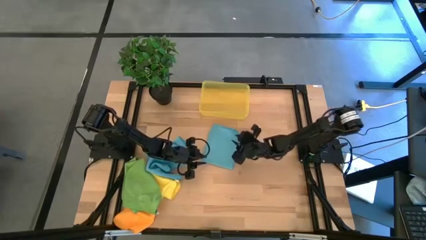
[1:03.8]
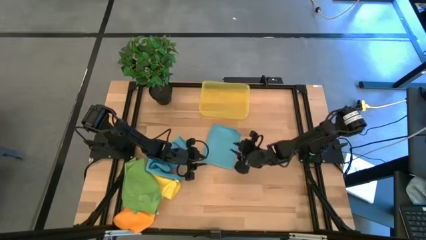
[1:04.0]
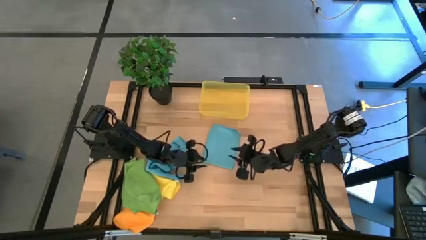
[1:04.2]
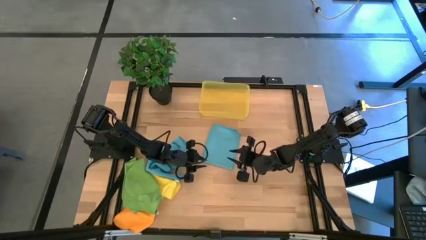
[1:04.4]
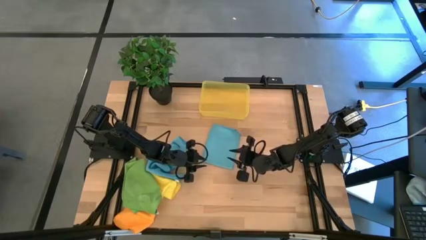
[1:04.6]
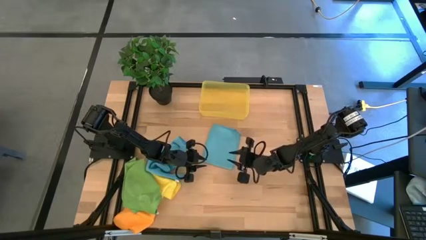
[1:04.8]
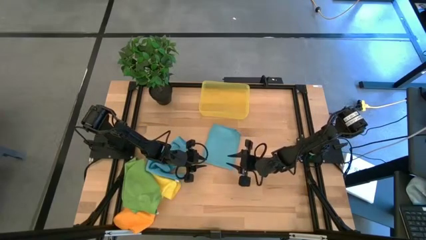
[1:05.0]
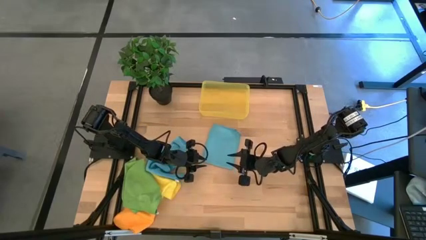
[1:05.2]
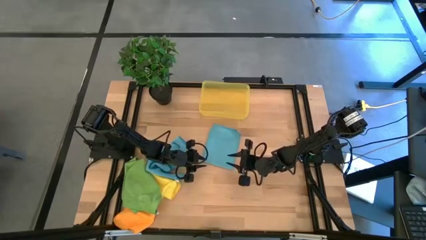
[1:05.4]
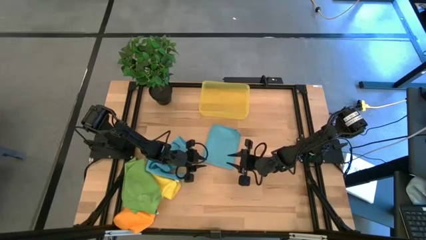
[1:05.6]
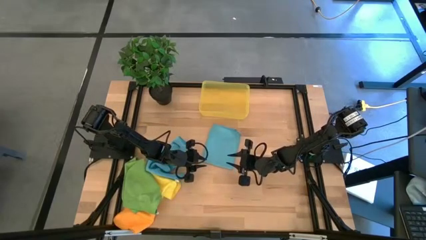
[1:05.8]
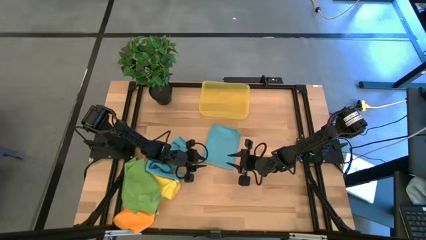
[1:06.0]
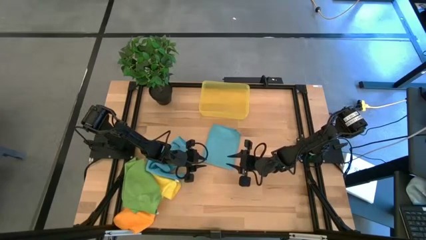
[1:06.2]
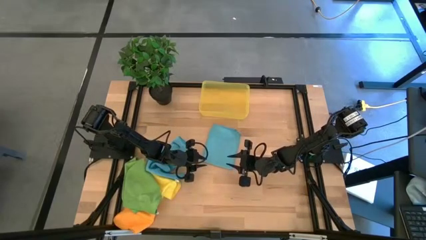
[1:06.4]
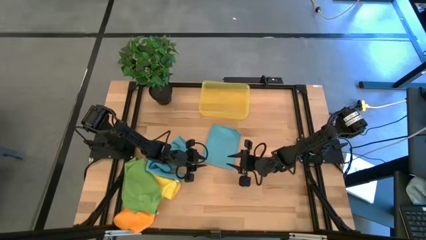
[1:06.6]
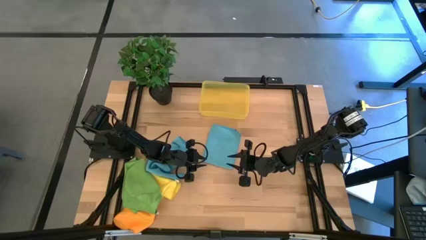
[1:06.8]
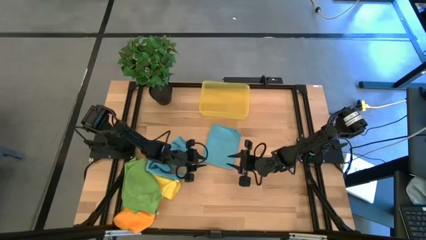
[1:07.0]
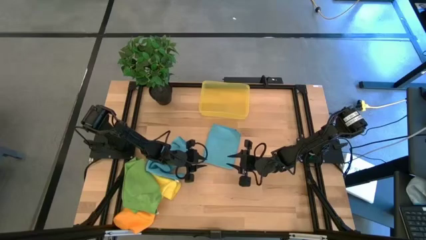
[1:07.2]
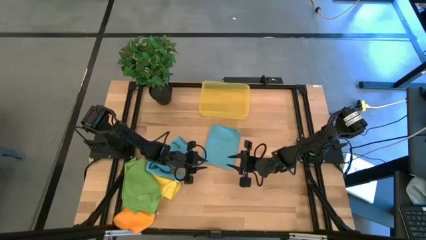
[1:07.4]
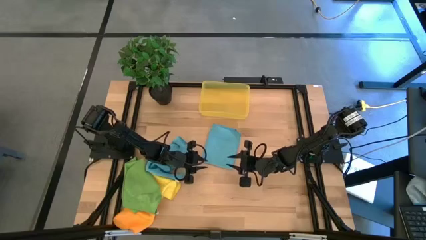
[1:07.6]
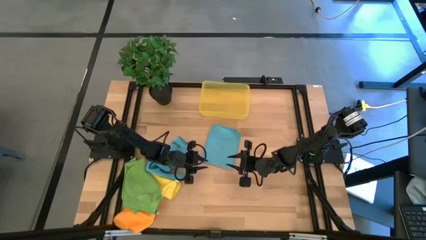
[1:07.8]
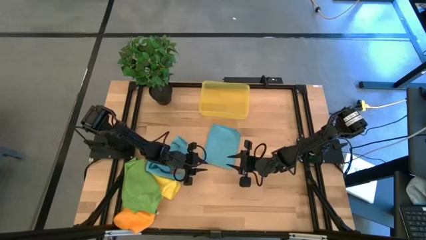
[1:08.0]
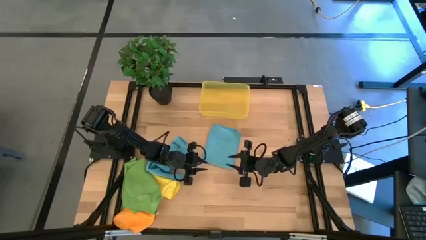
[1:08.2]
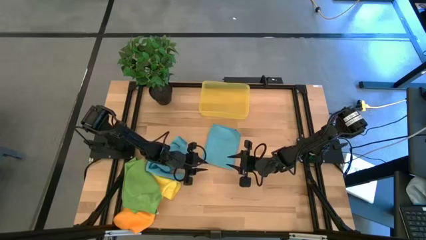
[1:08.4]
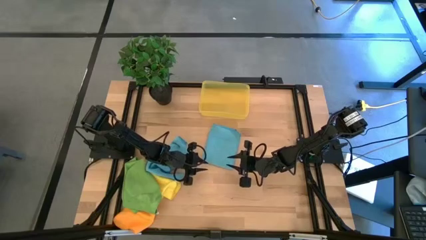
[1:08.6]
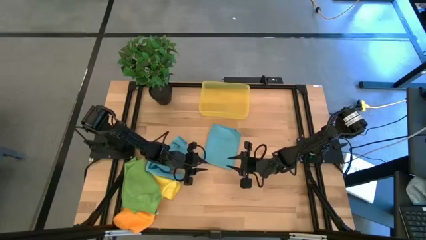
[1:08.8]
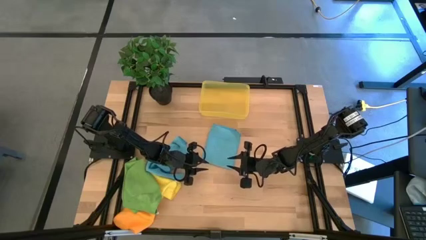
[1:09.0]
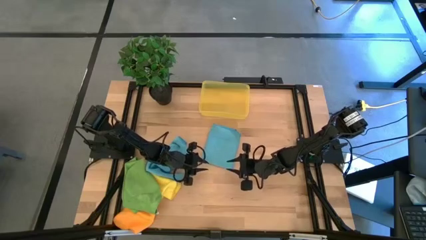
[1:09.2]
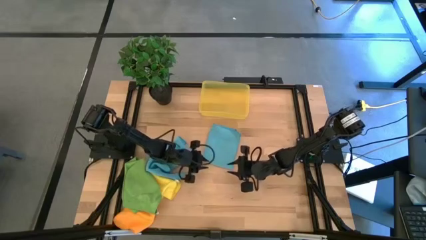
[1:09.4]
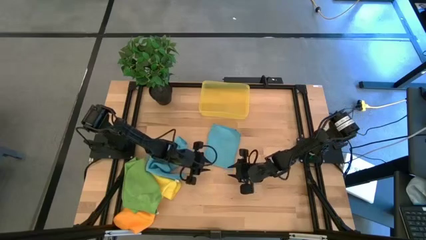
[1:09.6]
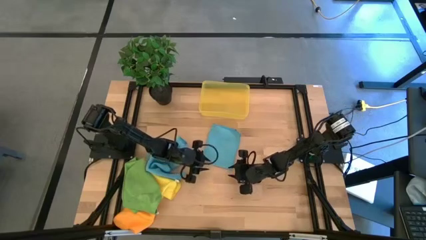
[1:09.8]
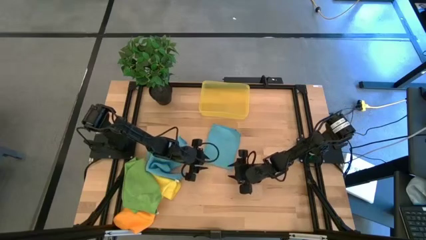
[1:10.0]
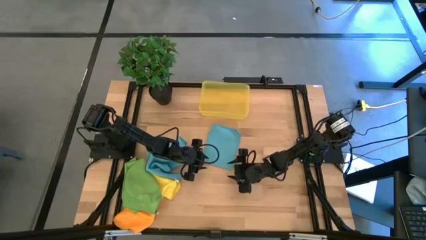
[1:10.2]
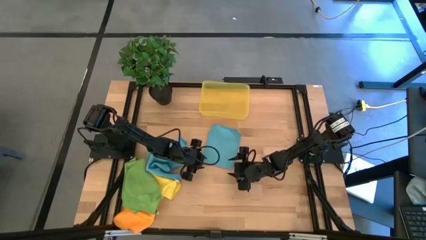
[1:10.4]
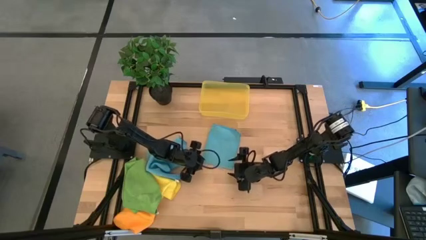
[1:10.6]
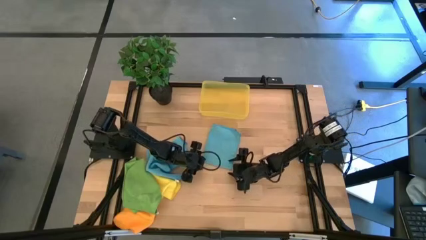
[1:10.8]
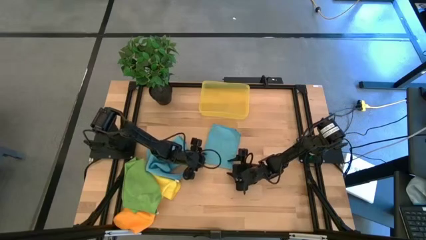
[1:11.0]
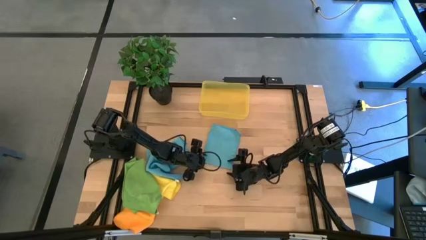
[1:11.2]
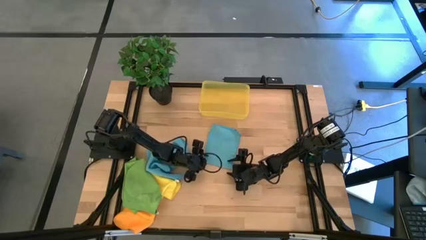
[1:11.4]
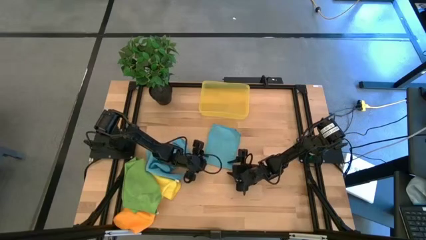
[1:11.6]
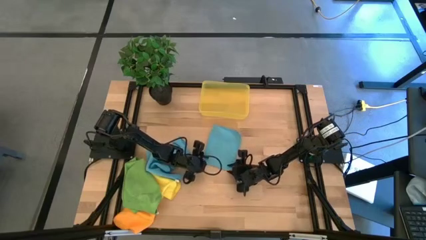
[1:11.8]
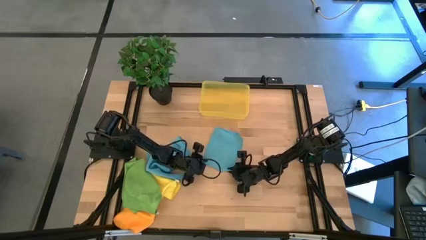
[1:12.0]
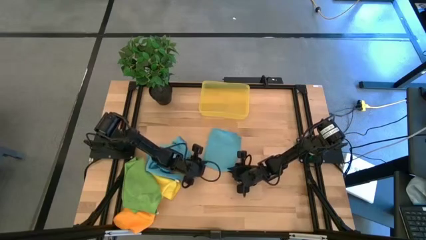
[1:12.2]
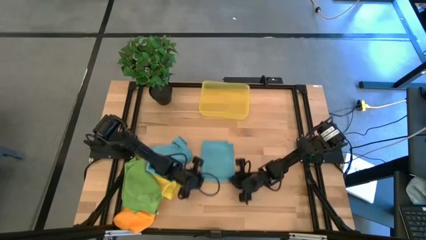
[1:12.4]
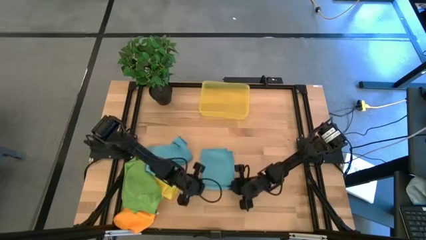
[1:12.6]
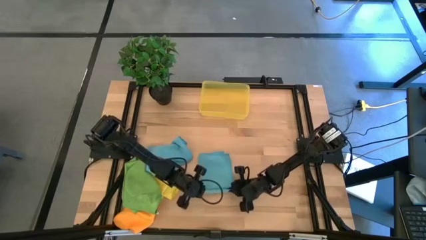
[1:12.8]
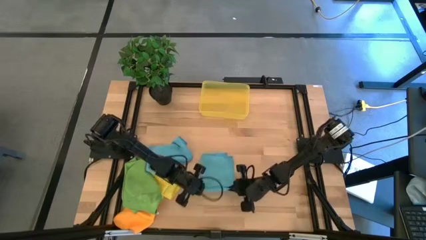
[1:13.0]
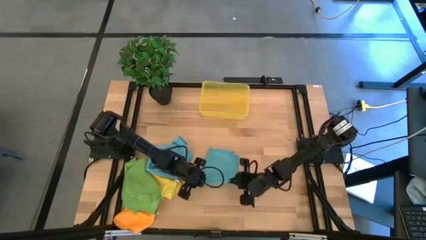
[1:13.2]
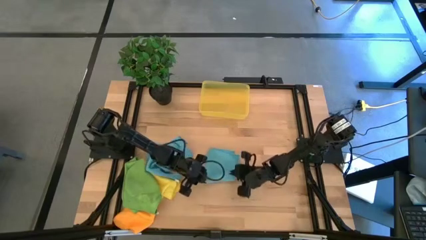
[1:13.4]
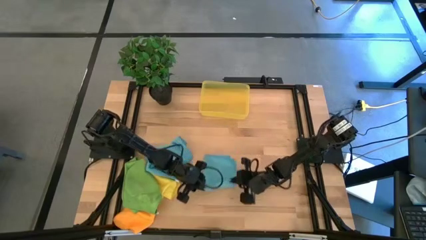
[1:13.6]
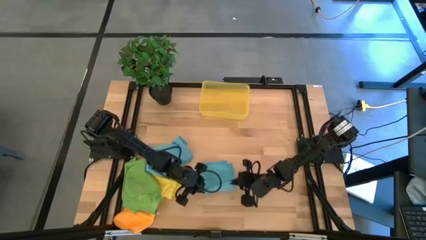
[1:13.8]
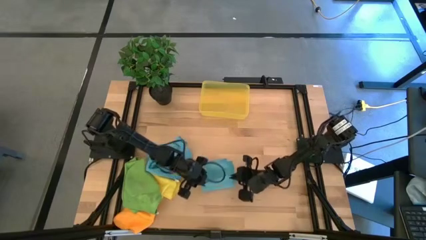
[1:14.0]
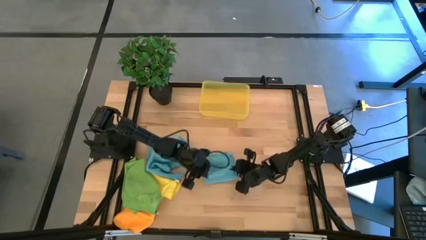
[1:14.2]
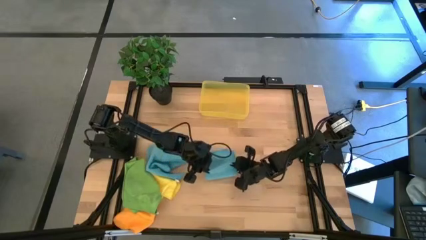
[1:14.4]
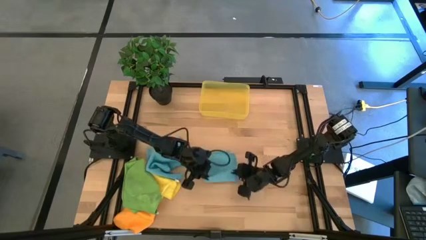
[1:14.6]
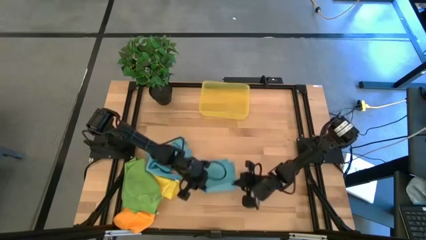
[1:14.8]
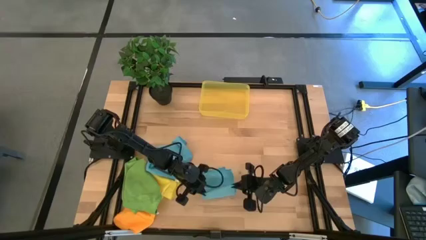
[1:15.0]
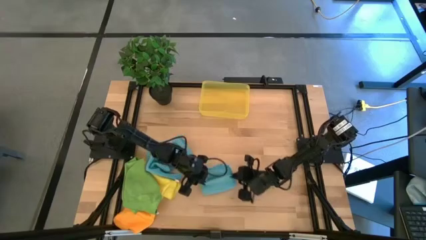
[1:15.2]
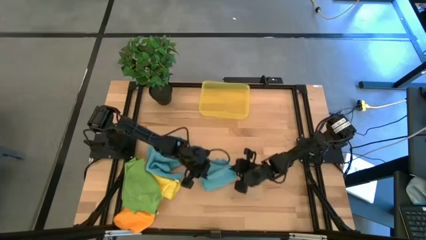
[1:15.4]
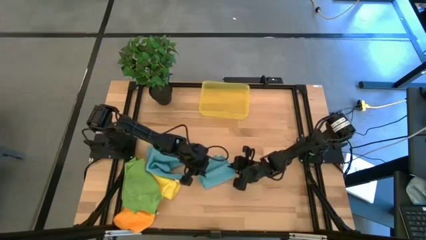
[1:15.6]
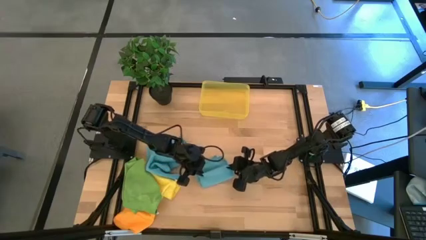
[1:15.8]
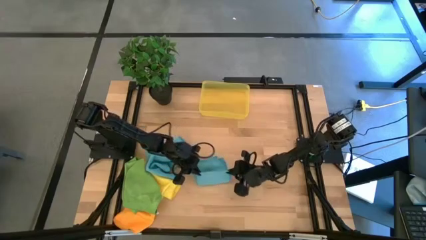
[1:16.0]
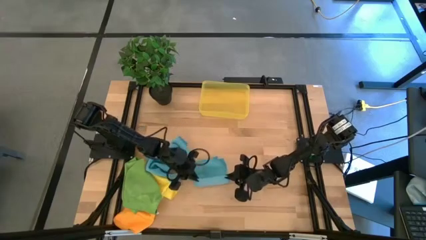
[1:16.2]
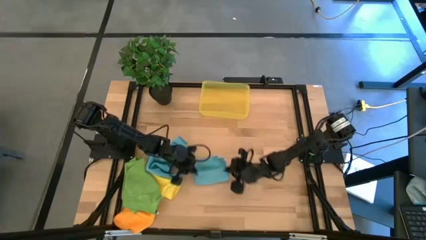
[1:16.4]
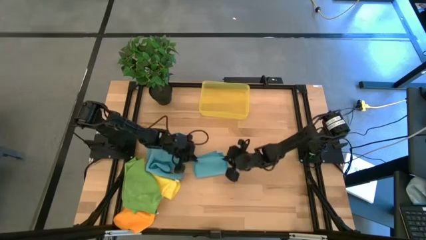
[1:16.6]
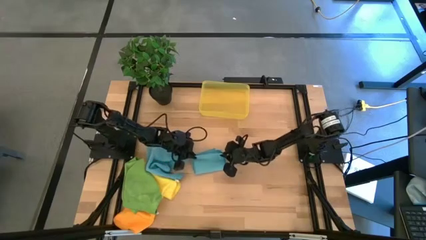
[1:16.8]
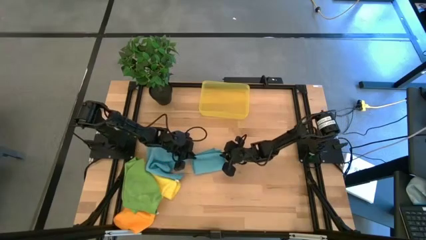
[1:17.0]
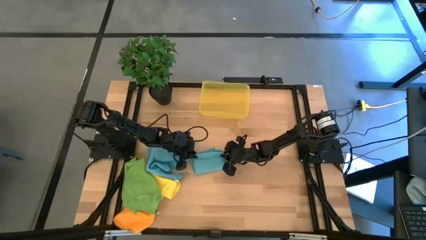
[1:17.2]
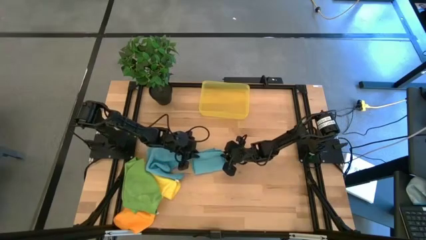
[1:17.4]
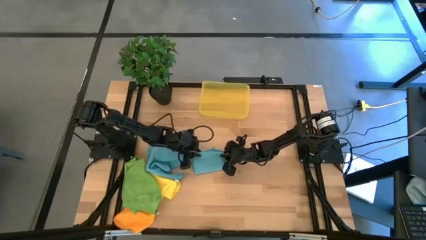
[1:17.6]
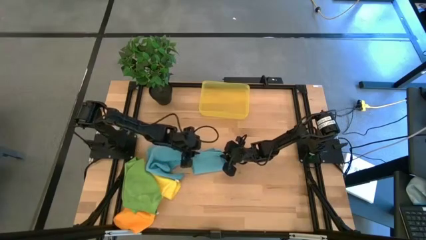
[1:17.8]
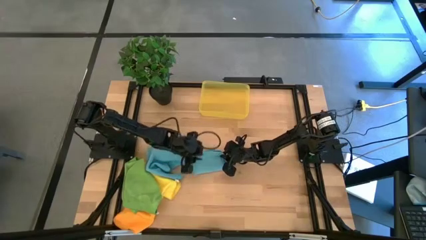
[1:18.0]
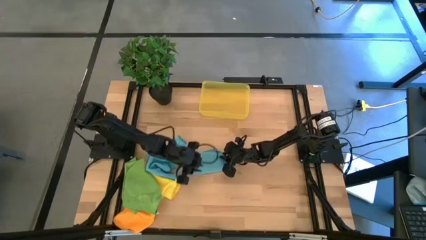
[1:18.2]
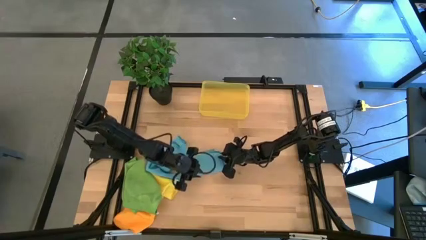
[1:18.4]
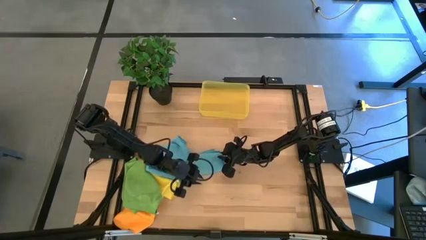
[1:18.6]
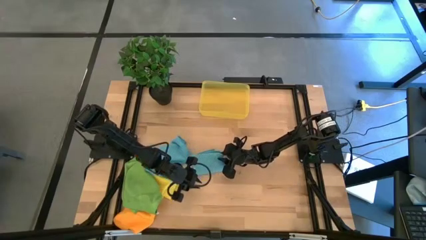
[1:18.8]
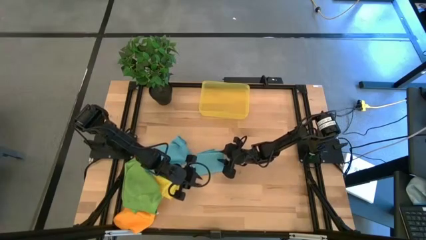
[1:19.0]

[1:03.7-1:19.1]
Task: Fold microfiber towels
Fold the left blue microfiber towel
